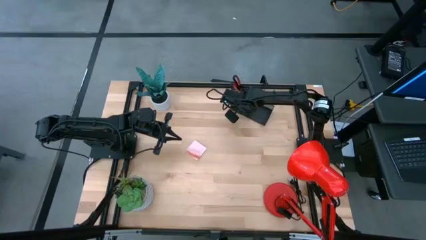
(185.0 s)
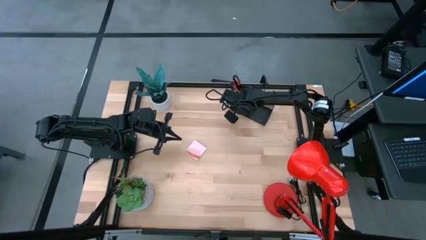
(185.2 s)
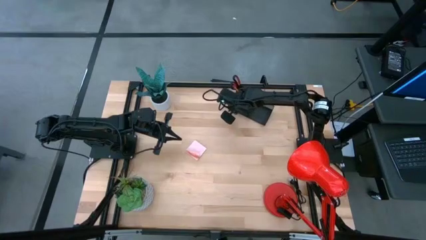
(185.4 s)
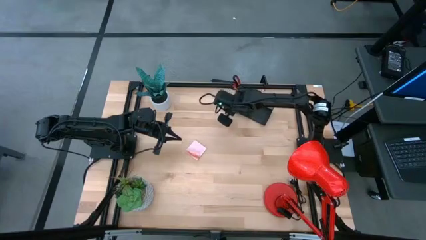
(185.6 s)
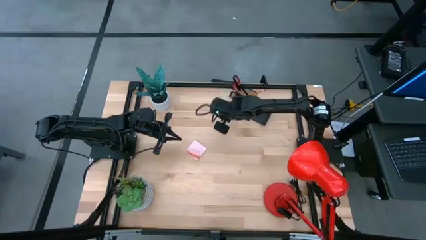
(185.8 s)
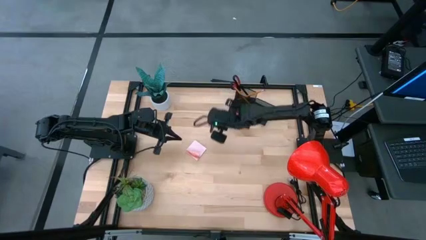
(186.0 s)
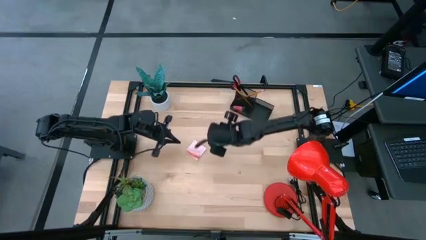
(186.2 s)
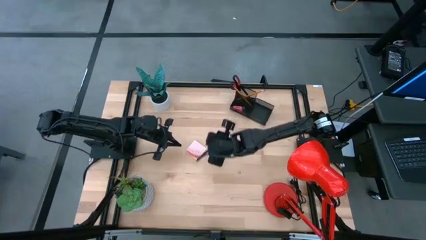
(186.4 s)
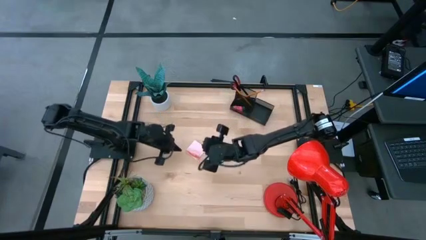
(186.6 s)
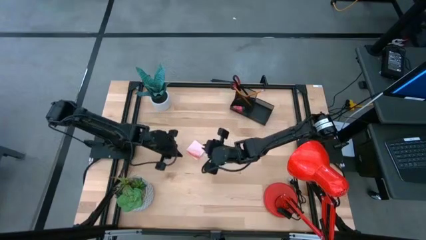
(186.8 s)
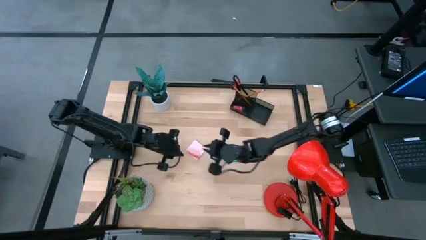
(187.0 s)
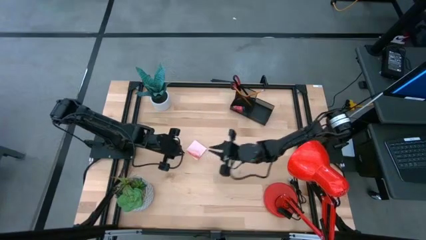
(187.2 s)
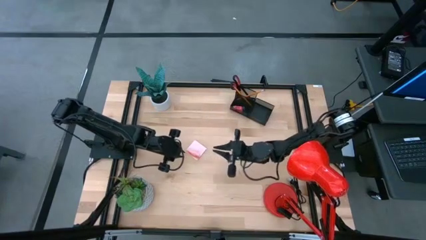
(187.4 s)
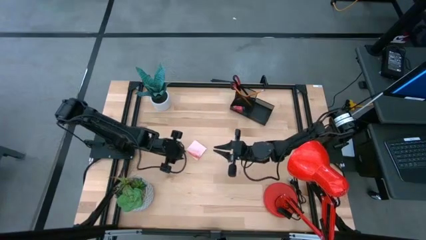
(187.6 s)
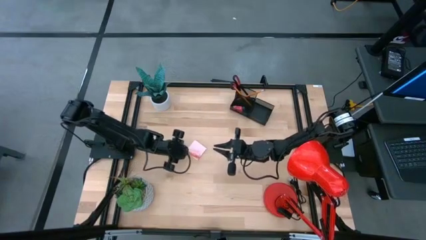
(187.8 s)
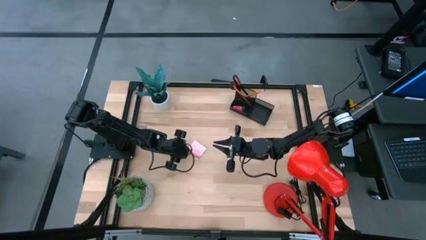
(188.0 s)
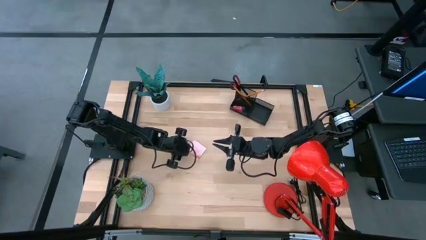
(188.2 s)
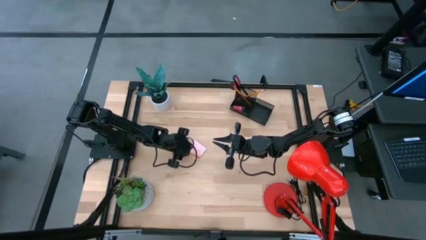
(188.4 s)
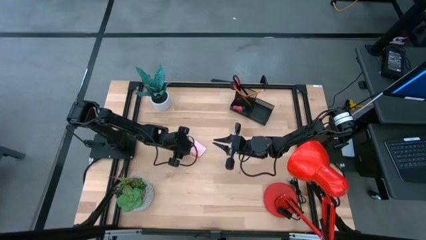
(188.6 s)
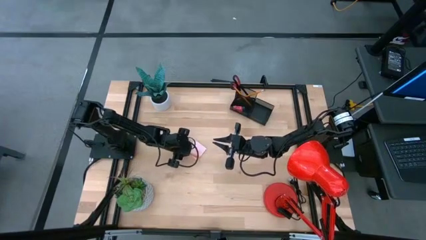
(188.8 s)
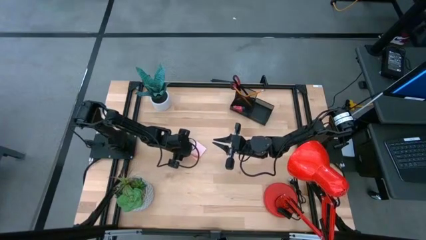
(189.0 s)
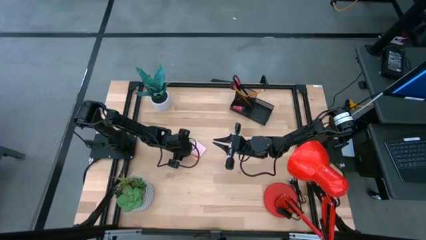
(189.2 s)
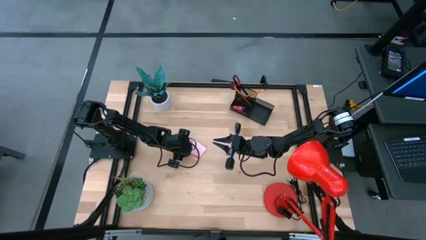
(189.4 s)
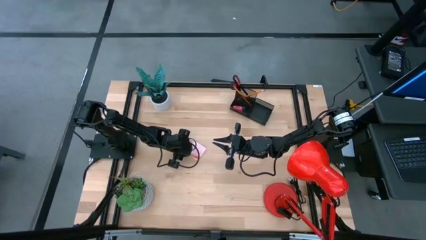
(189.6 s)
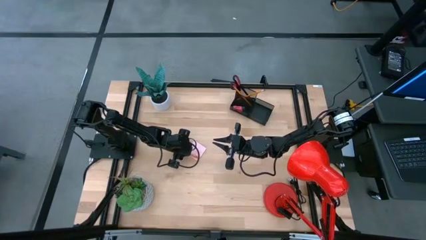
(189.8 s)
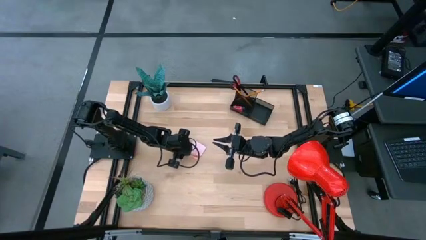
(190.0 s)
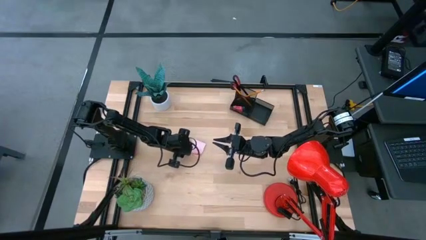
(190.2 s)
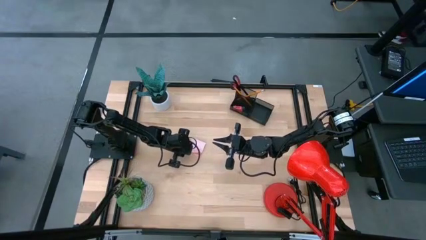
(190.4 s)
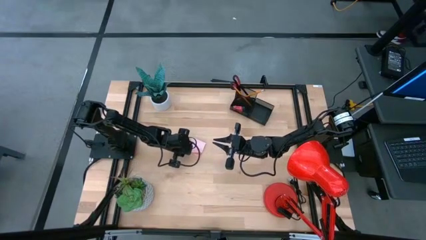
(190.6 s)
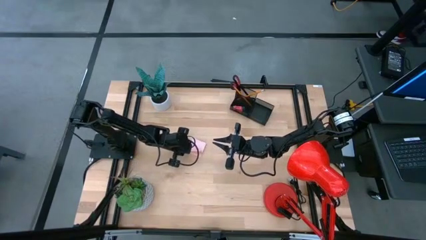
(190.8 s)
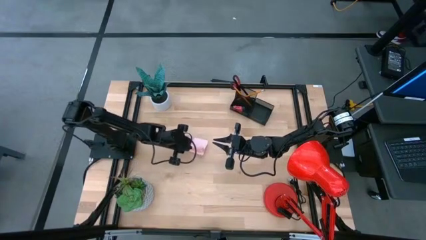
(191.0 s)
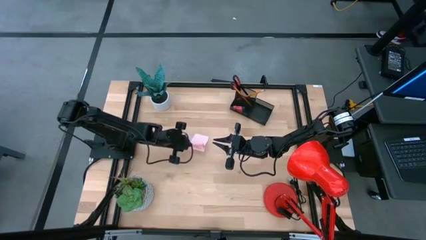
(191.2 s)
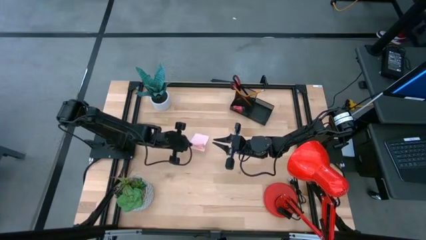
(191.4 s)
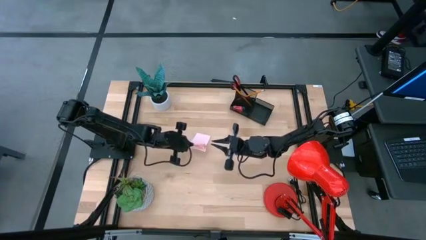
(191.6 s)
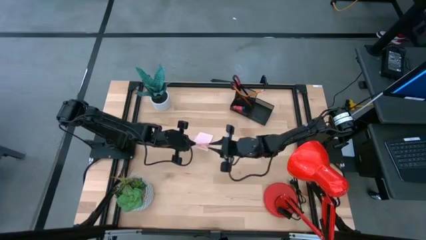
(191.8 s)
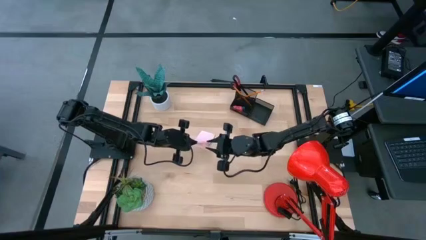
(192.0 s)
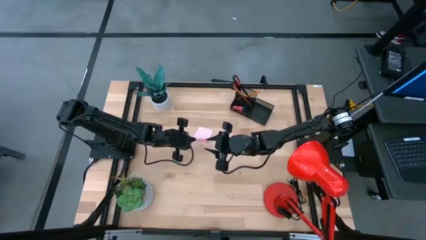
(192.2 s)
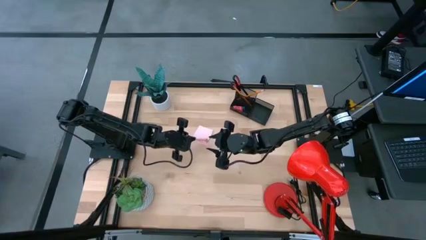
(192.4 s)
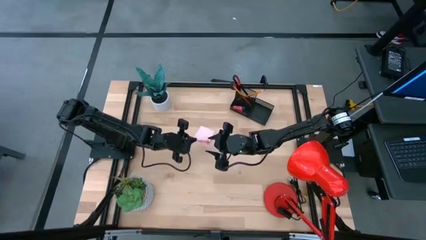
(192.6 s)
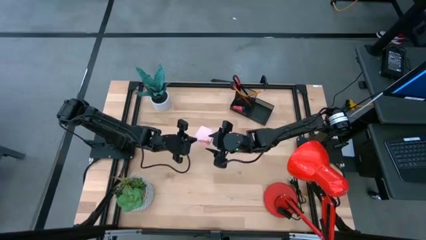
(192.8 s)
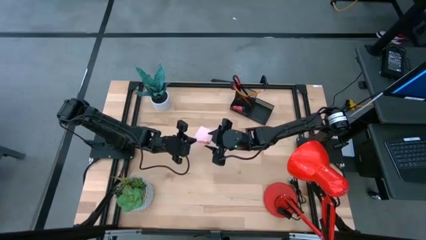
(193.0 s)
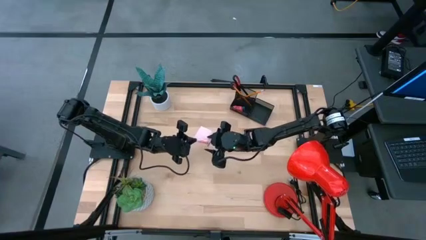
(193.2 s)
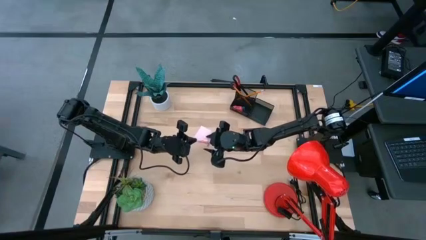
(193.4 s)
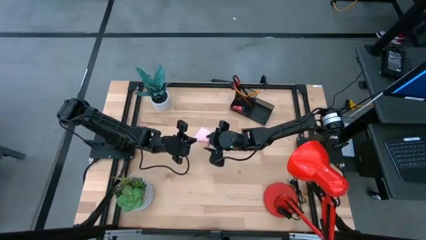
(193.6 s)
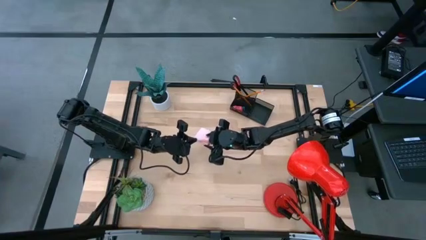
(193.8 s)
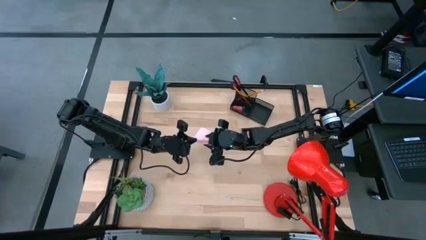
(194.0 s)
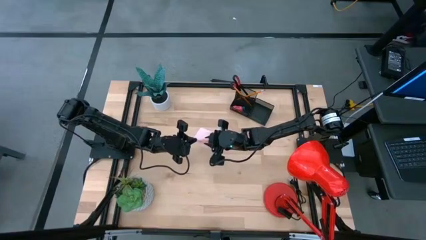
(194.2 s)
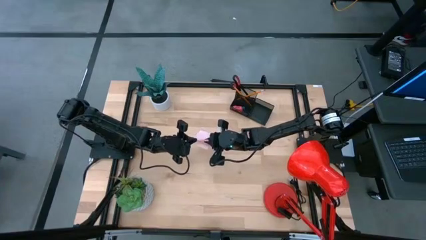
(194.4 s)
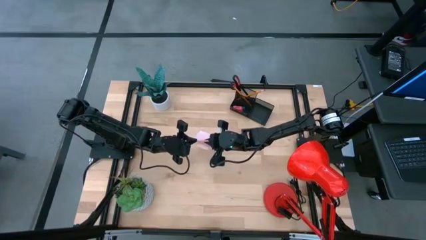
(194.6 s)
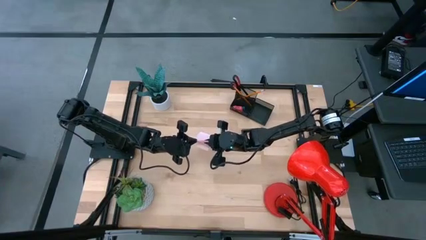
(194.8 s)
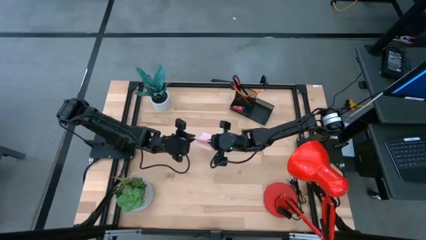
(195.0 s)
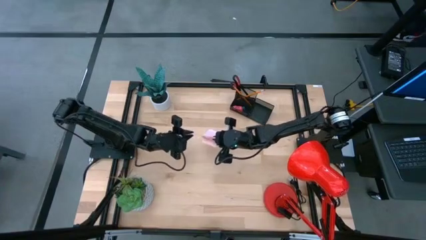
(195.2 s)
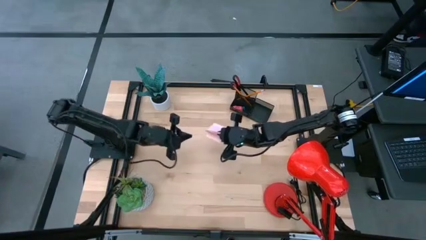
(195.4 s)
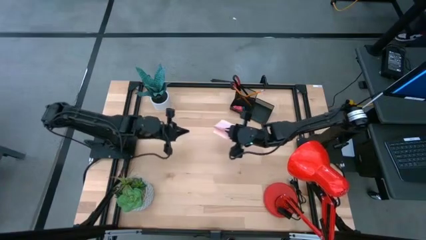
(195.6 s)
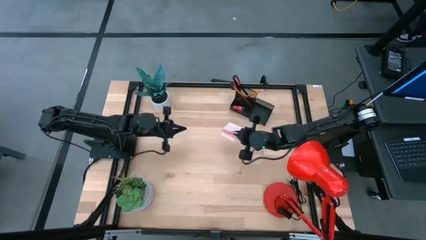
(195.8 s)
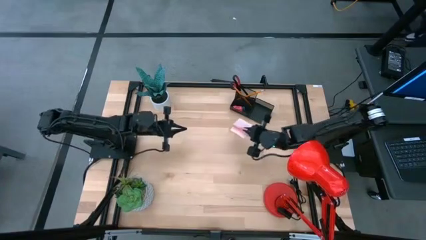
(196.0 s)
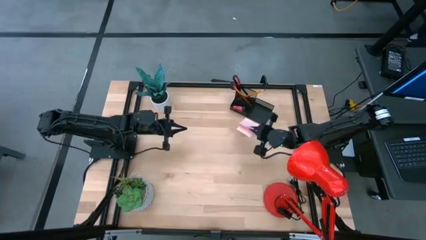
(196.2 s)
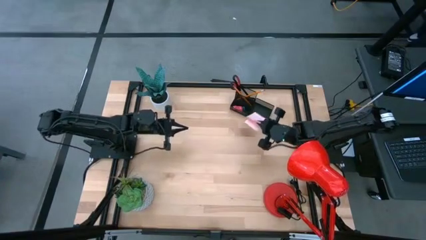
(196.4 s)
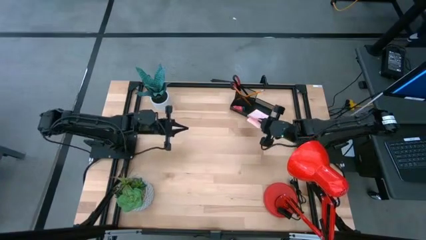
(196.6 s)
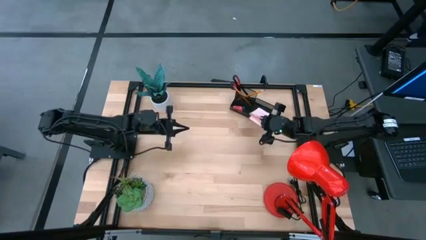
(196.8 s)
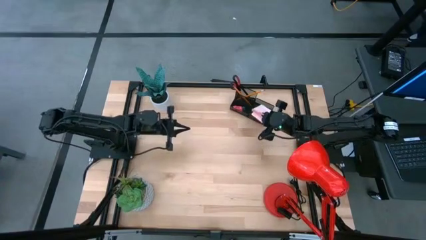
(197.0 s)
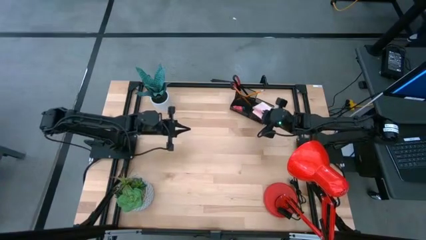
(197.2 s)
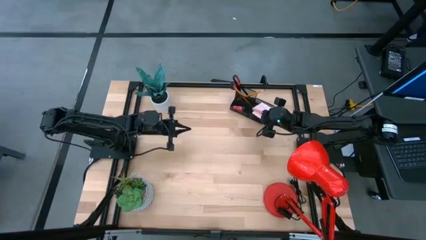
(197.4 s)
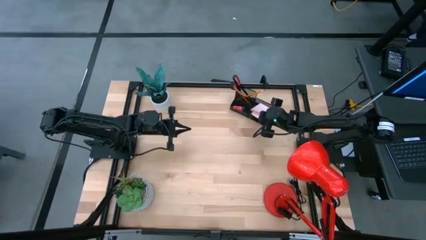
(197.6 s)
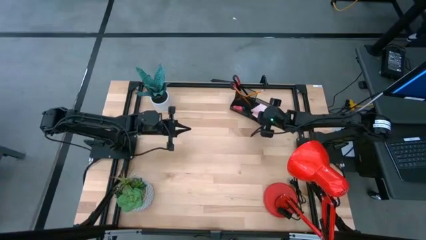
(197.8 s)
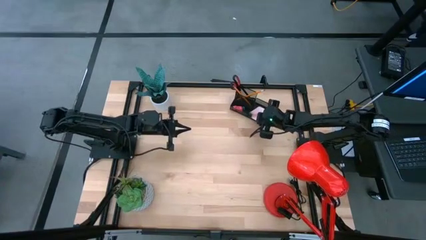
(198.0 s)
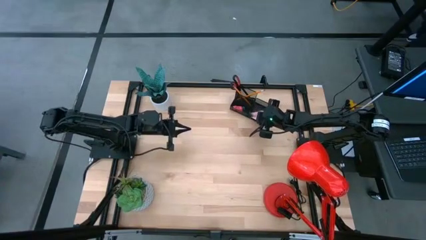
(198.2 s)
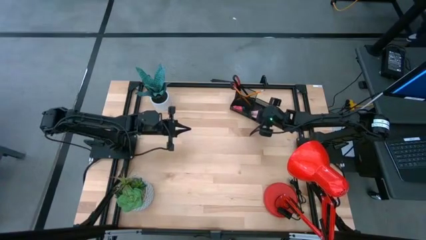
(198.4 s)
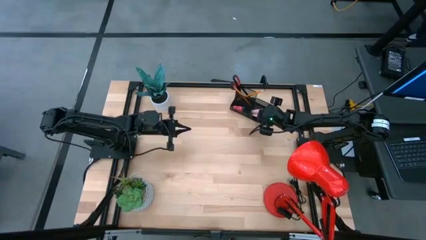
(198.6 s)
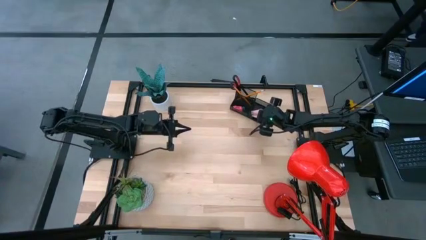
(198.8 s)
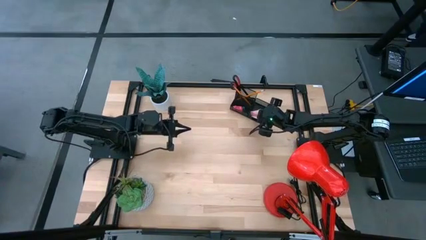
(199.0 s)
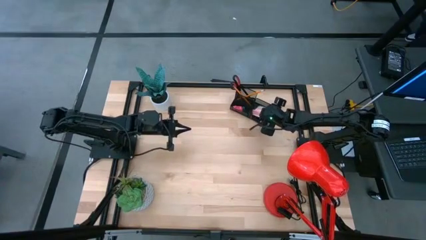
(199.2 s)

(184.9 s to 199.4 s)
Task: Pick and place office supplies into organizer
Put the pink sticky note into the black desk organizer
